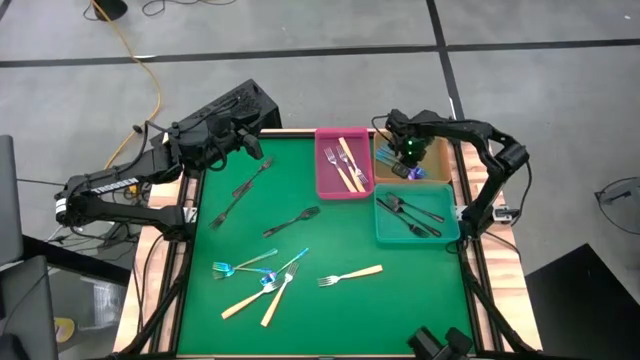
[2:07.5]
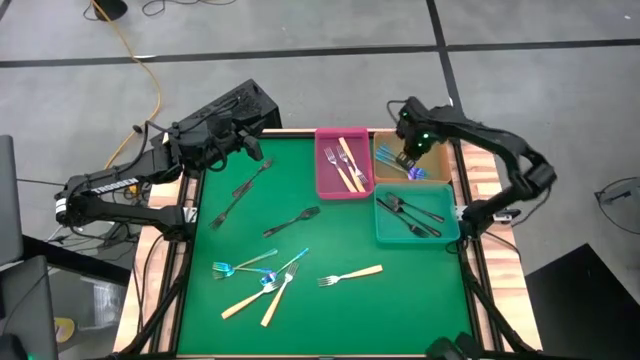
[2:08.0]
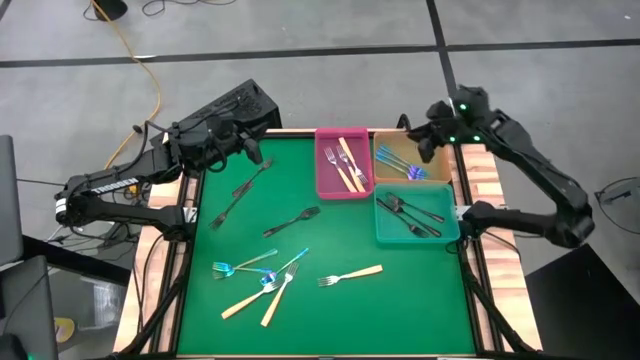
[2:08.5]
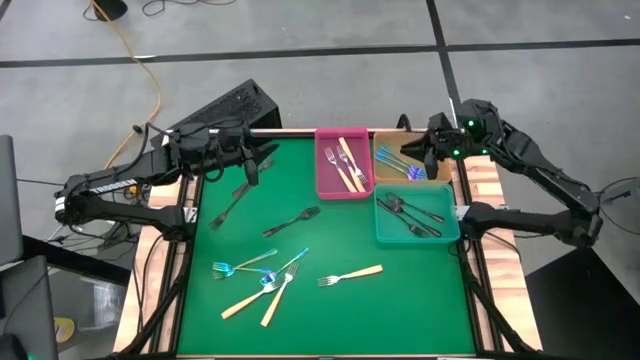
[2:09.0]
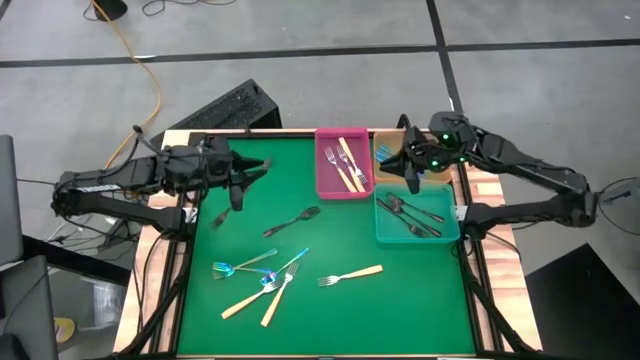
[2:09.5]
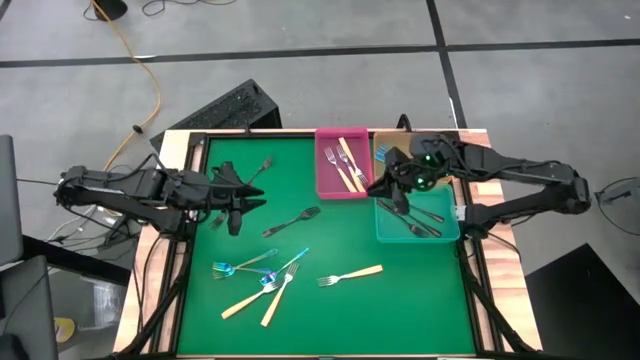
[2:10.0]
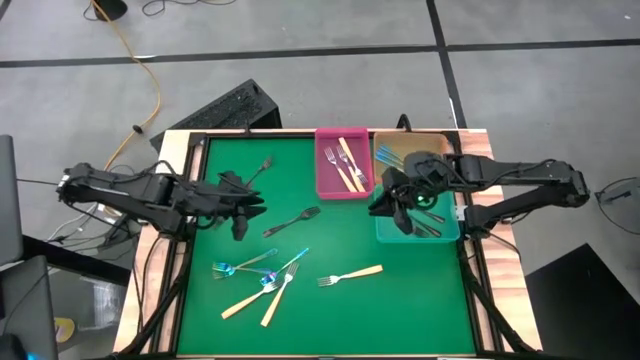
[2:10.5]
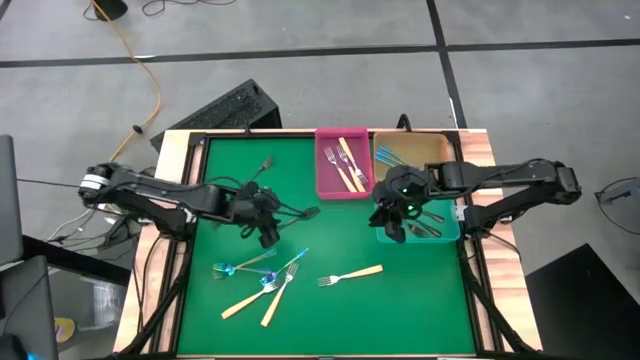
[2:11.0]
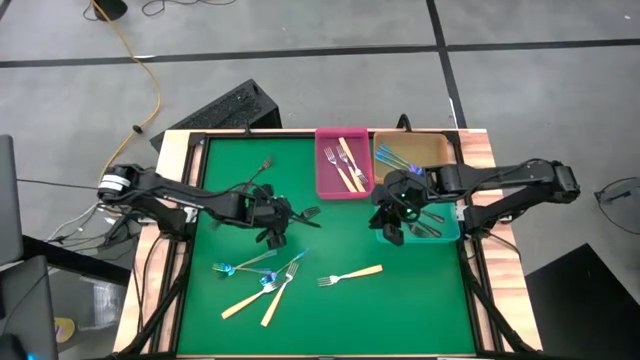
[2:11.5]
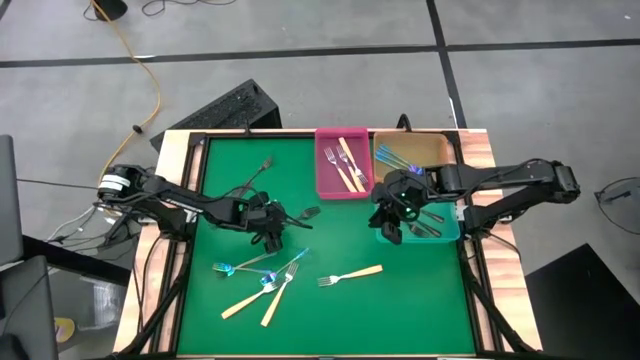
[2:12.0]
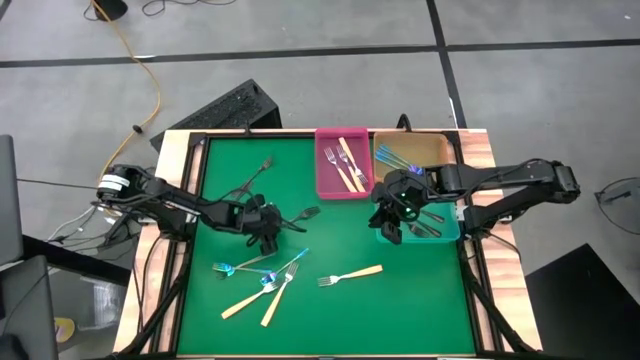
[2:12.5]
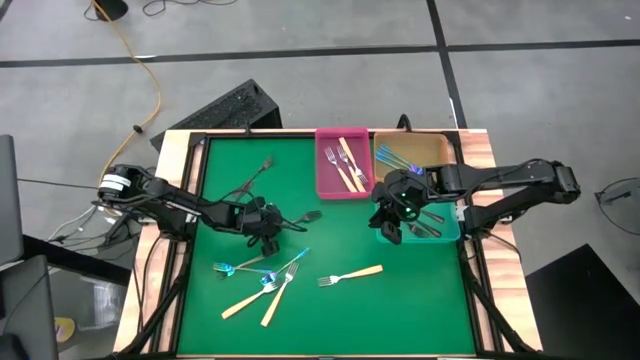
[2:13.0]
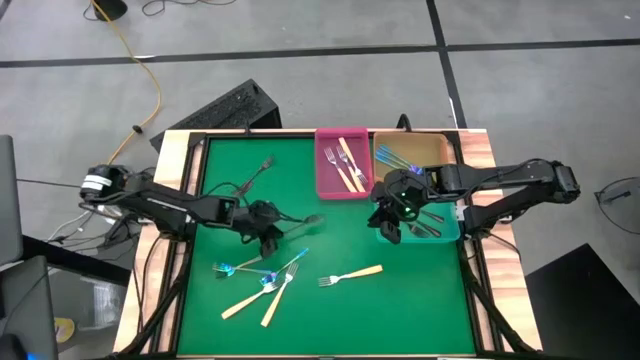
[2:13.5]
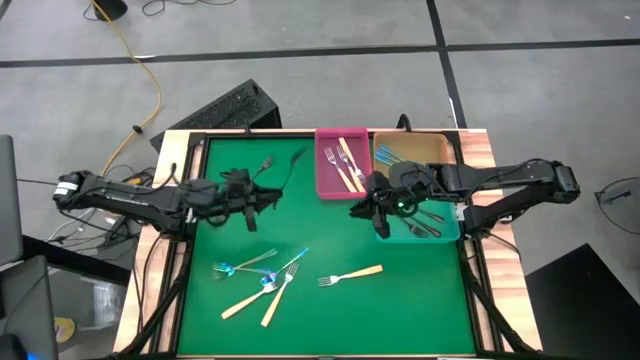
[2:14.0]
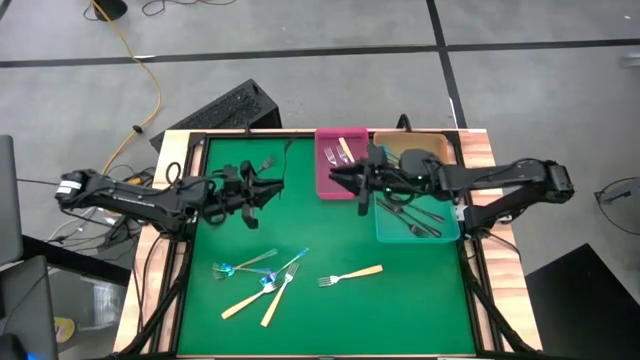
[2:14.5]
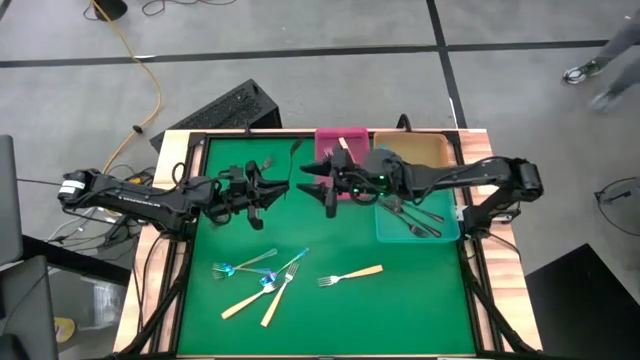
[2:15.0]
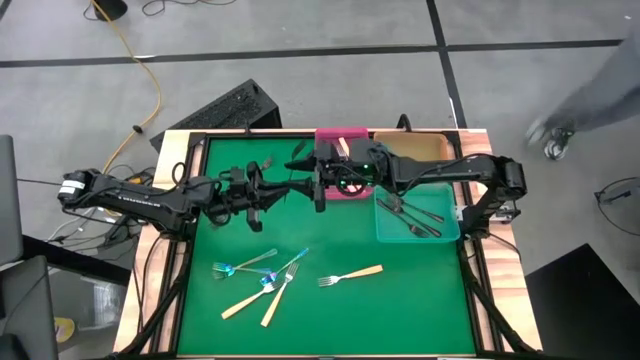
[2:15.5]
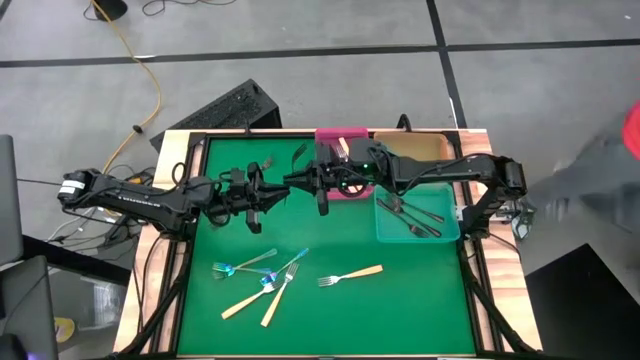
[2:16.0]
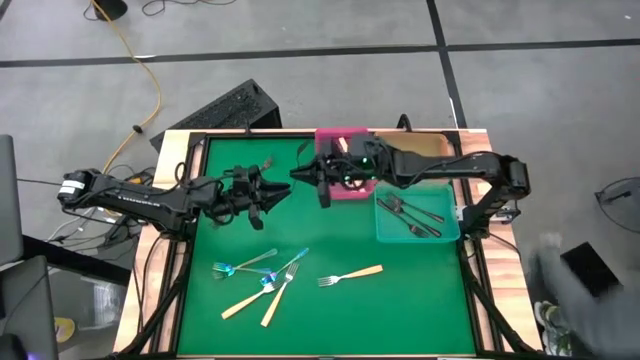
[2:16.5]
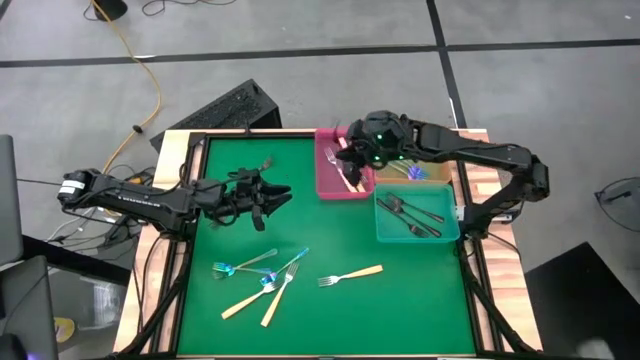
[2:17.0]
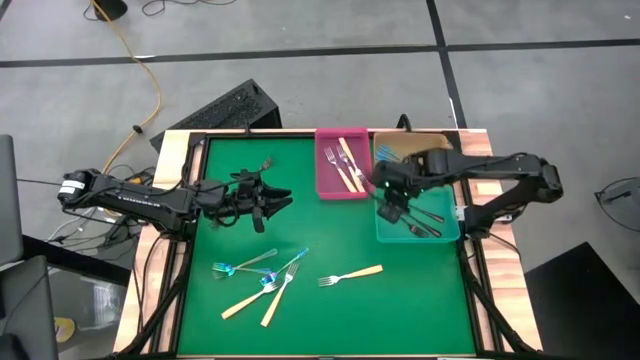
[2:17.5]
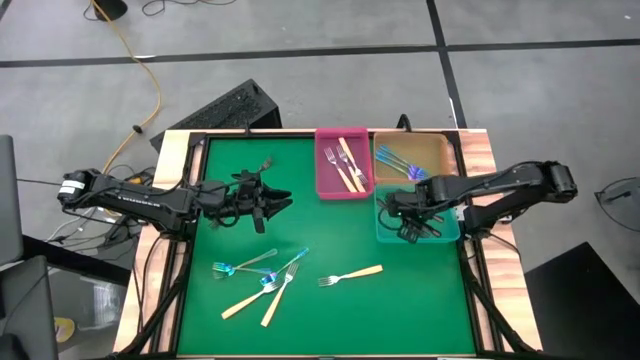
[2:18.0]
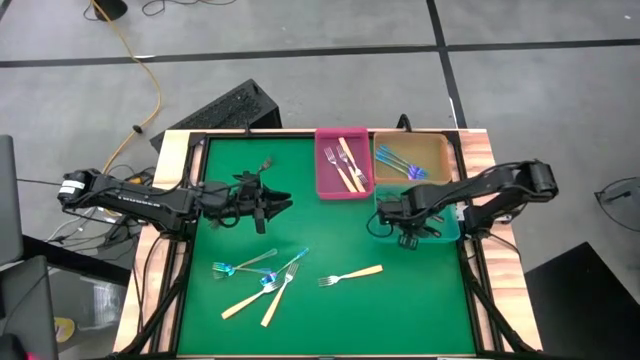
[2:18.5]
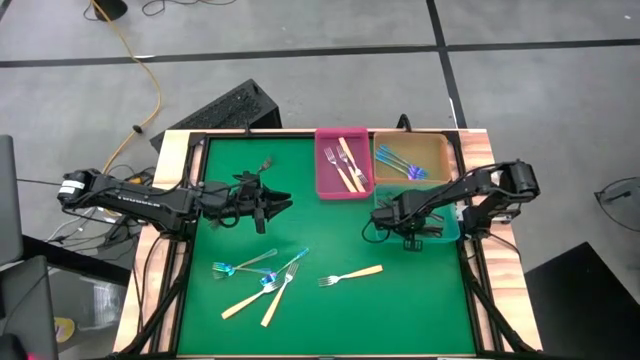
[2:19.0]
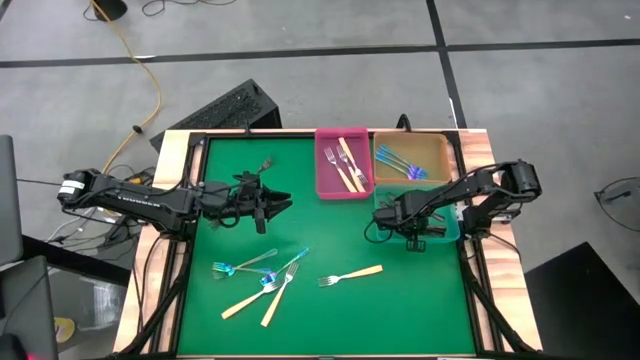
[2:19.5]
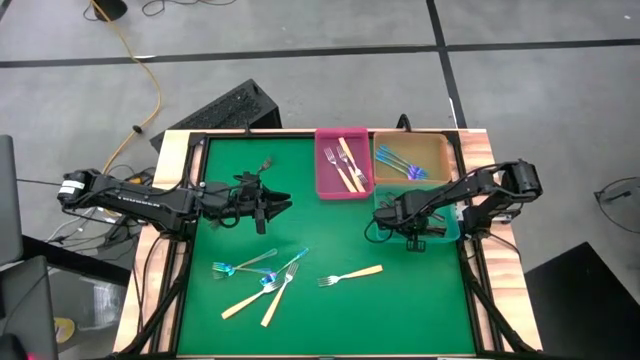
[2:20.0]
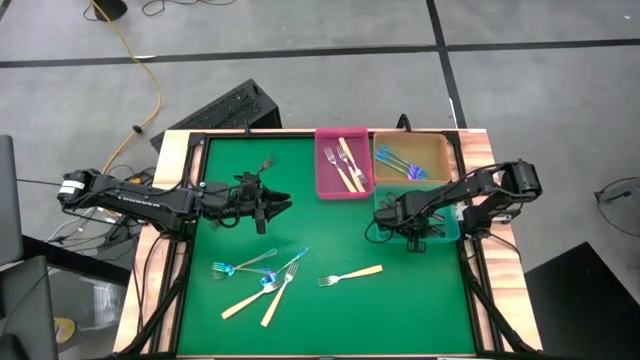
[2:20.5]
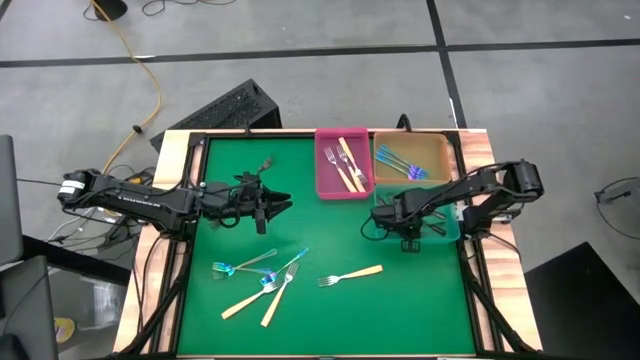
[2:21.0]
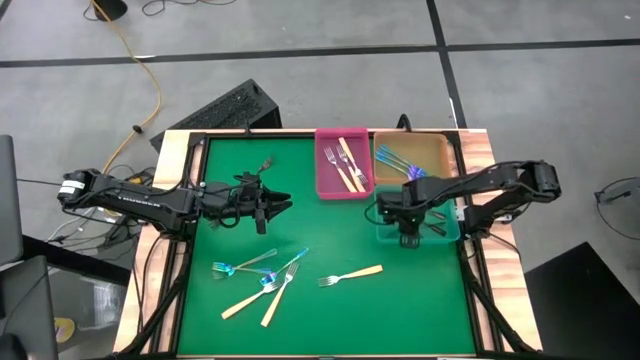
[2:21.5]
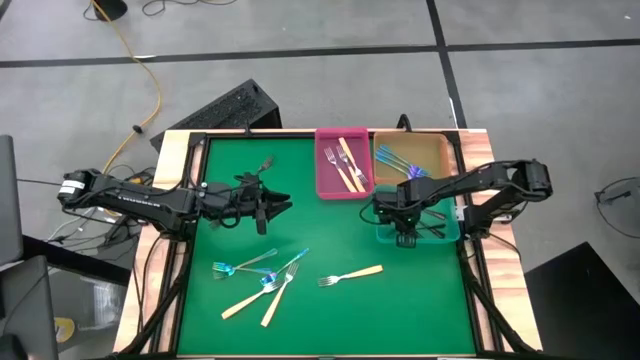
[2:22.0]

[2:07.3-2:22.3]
Task: Sort silverware by color (type)
Put the black fork into the blue bin

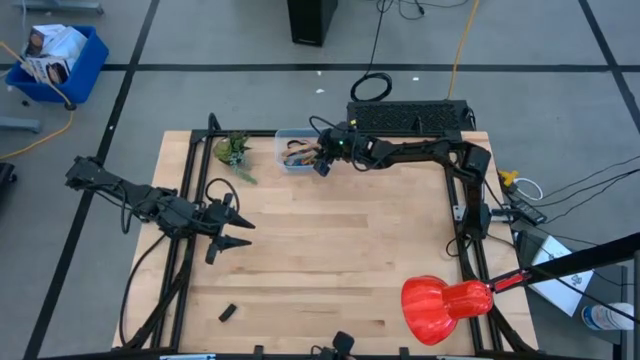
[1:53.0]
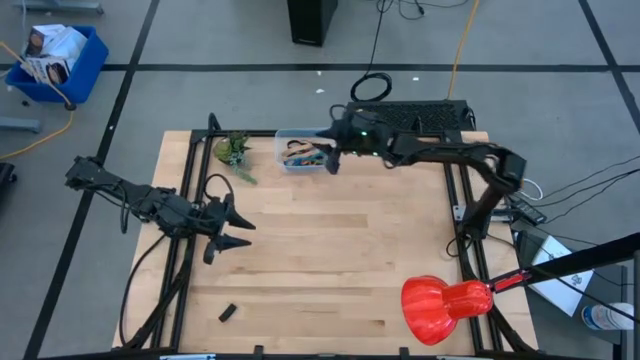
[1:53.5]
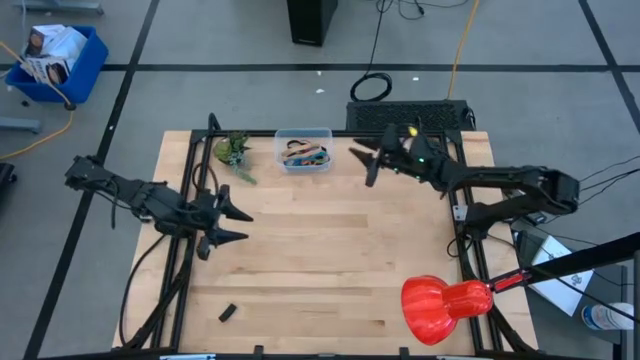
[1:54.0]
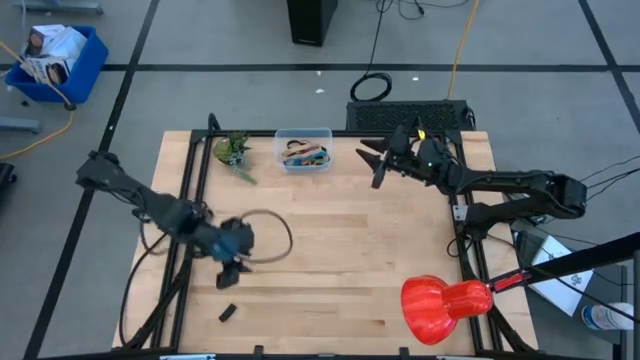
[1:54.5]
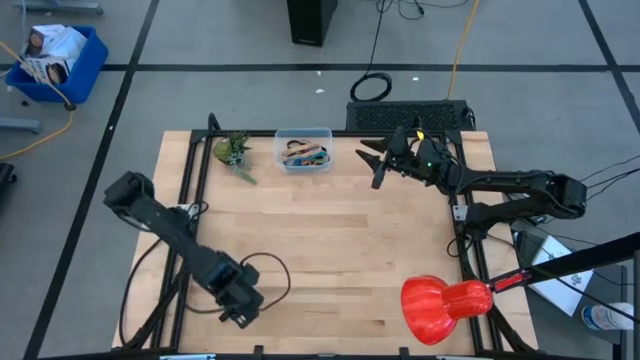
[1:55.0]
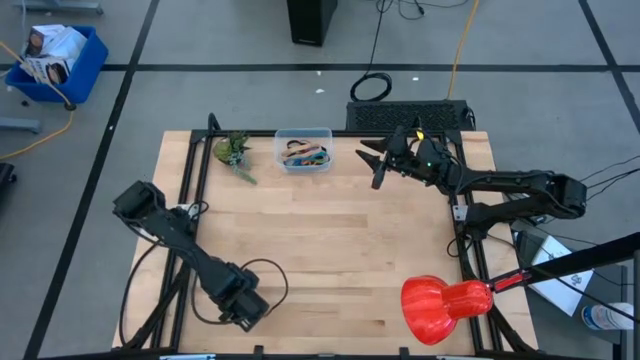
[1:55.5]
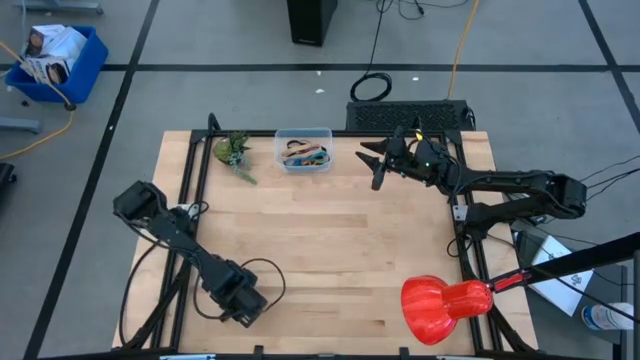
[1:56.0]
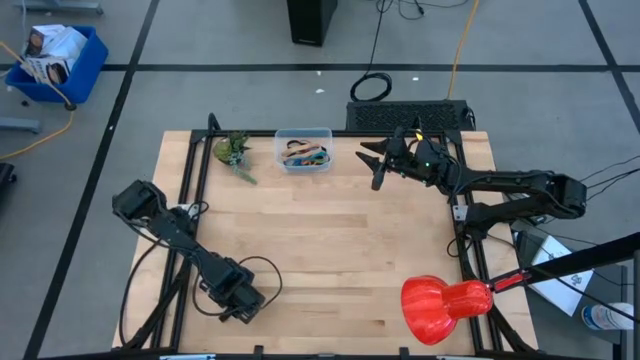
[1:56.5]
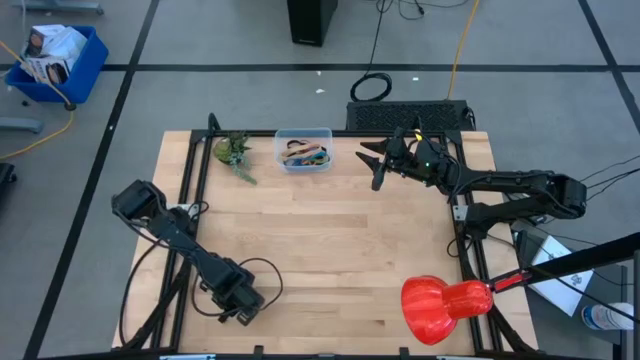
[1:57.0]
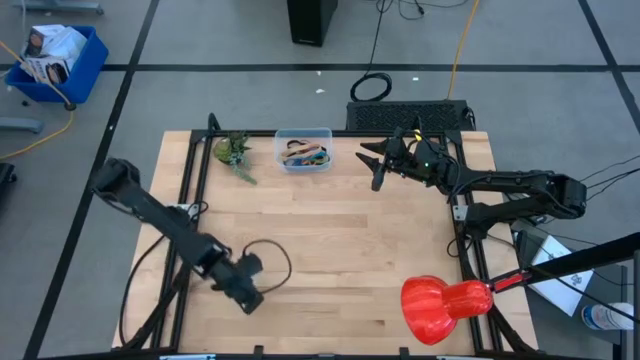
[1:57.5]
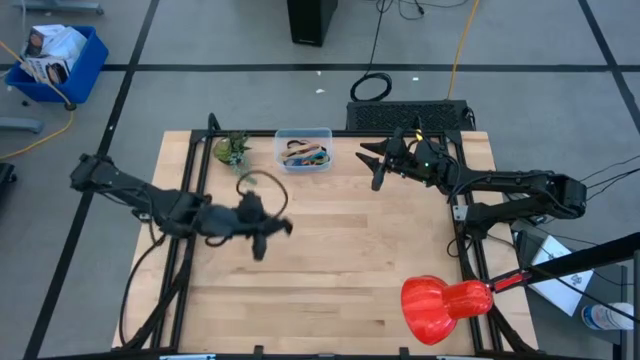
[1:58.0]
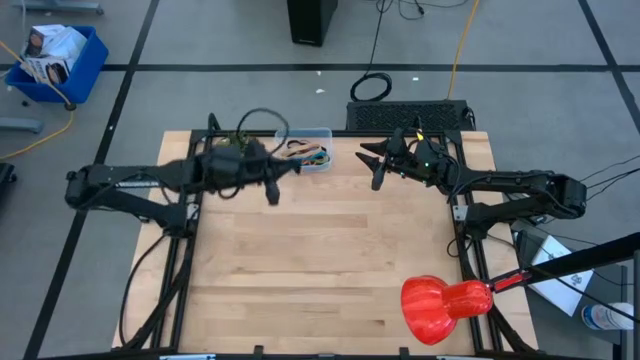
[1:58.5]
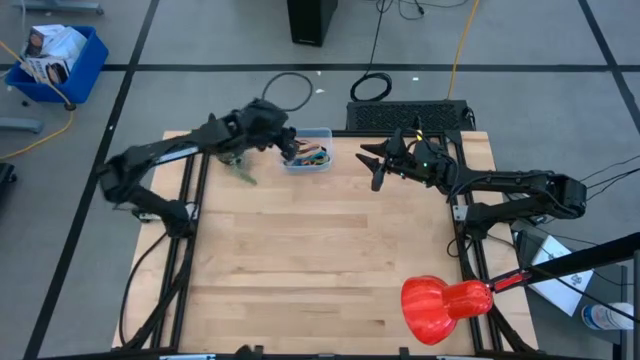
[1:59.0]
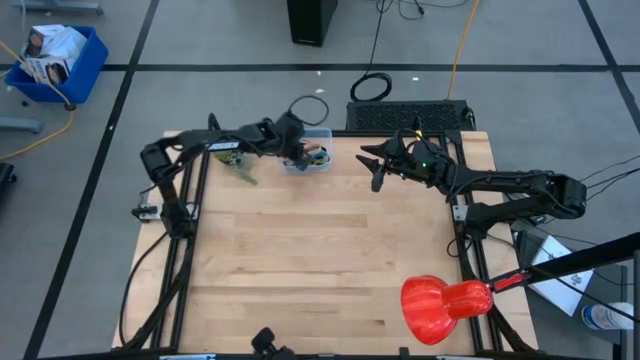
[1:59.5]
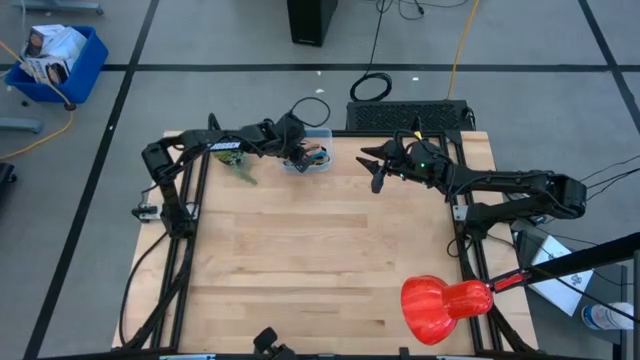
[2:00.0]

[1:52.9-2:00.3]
Task: Pick and place rubber bands into bin
Put the small black rubber band into the transparent bin
